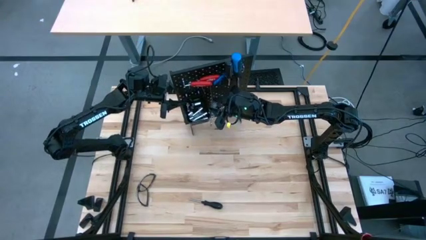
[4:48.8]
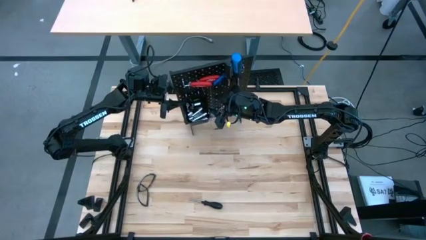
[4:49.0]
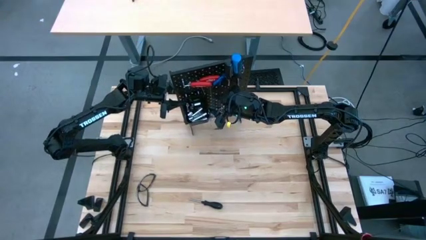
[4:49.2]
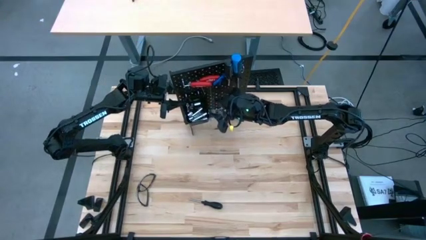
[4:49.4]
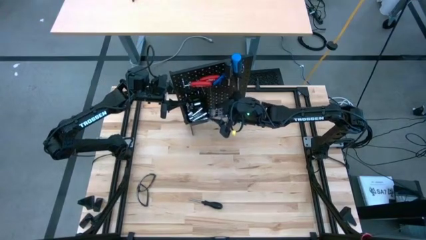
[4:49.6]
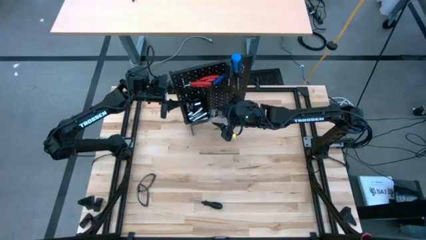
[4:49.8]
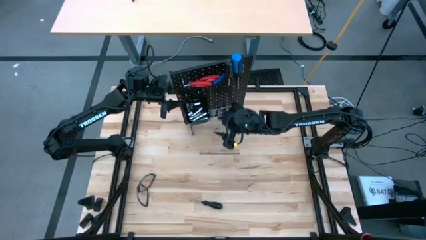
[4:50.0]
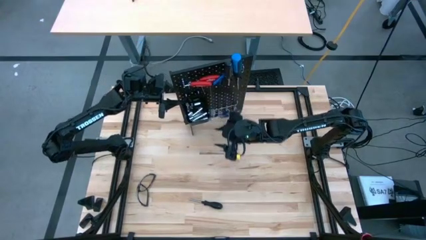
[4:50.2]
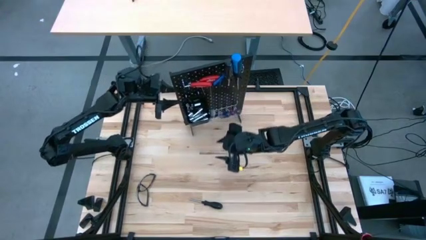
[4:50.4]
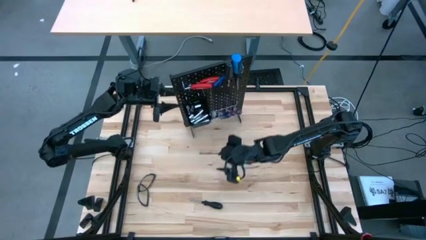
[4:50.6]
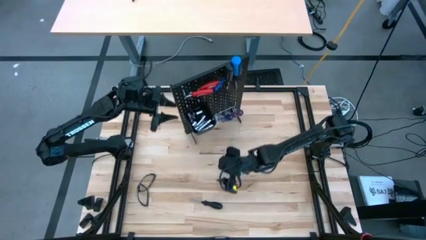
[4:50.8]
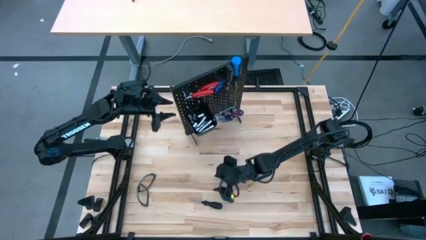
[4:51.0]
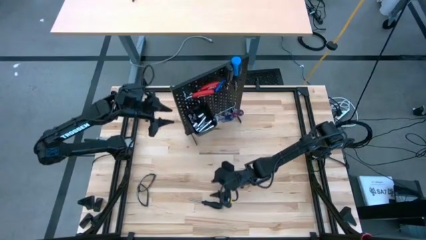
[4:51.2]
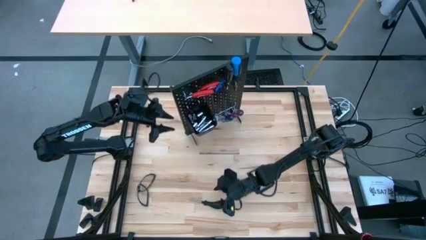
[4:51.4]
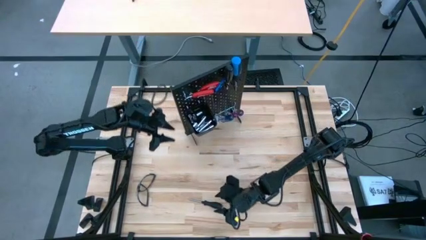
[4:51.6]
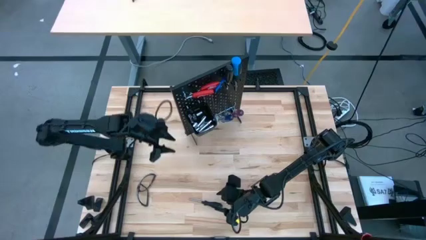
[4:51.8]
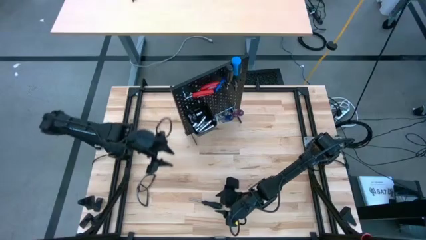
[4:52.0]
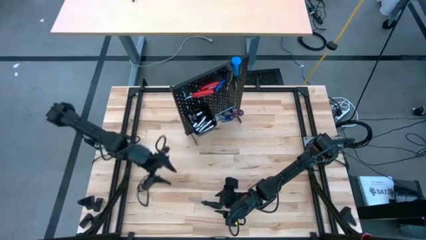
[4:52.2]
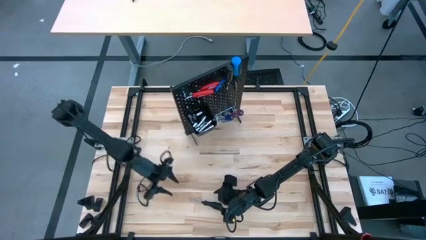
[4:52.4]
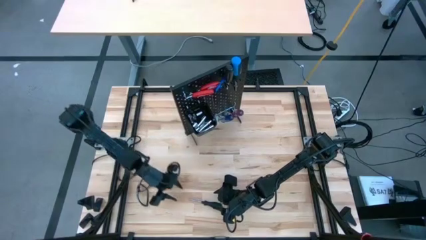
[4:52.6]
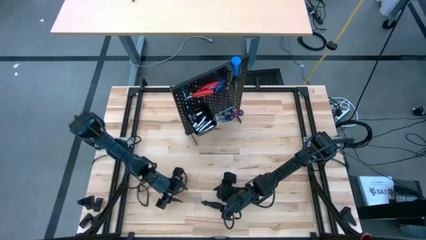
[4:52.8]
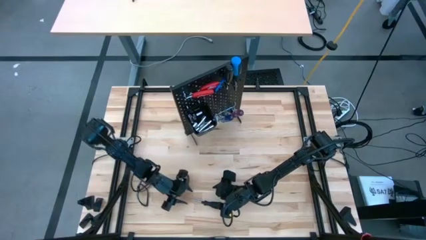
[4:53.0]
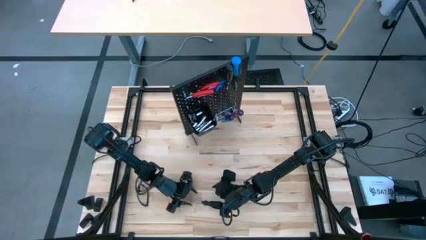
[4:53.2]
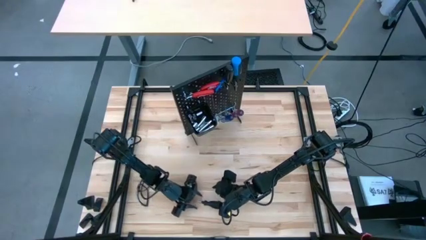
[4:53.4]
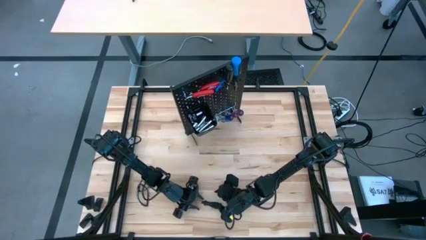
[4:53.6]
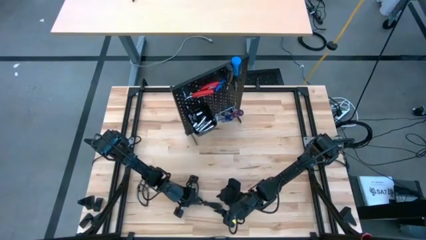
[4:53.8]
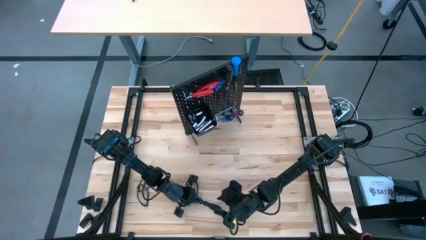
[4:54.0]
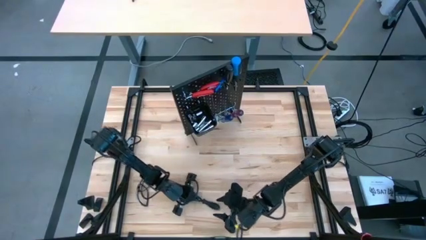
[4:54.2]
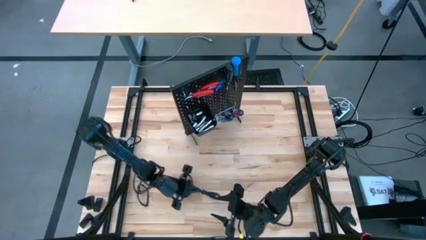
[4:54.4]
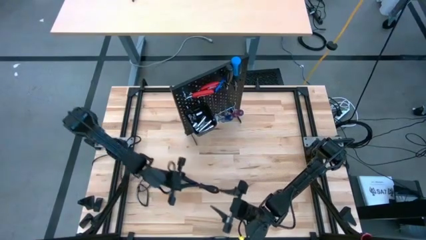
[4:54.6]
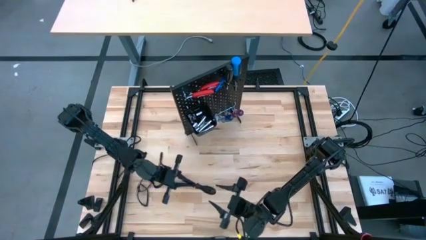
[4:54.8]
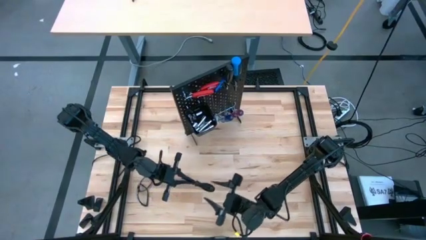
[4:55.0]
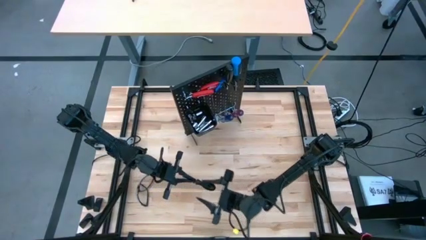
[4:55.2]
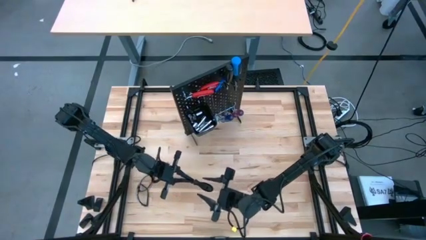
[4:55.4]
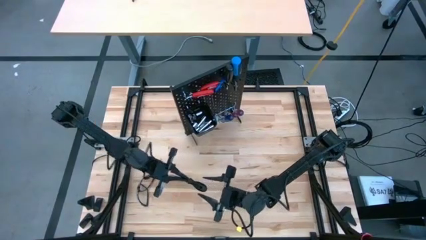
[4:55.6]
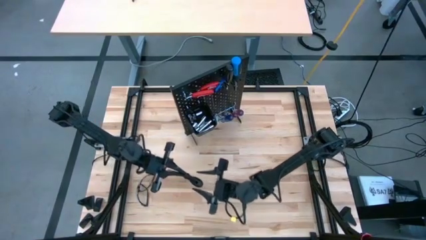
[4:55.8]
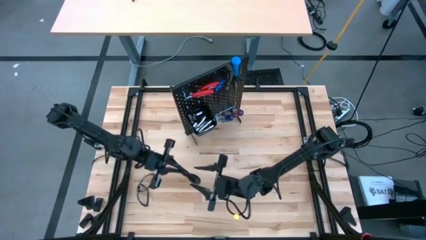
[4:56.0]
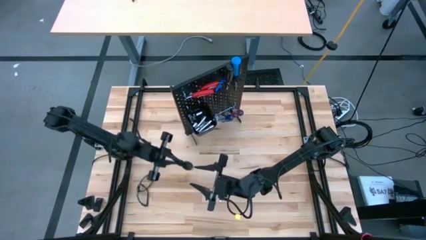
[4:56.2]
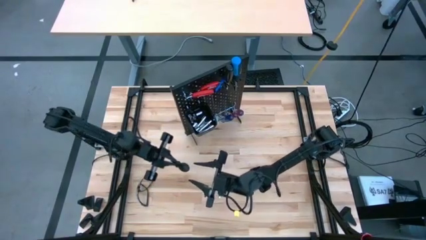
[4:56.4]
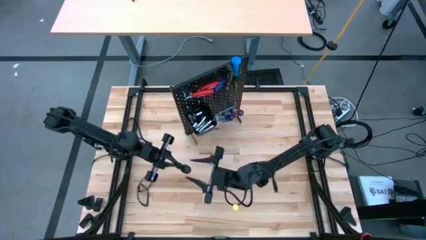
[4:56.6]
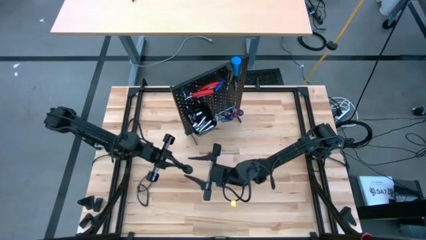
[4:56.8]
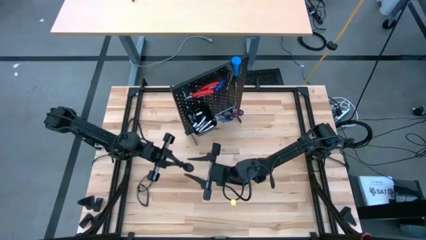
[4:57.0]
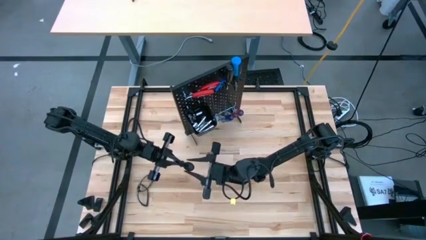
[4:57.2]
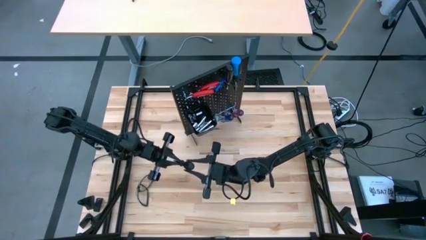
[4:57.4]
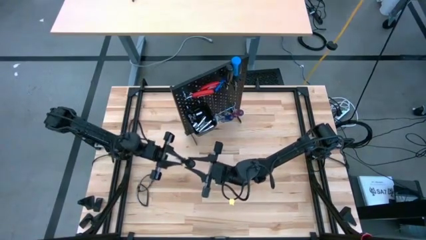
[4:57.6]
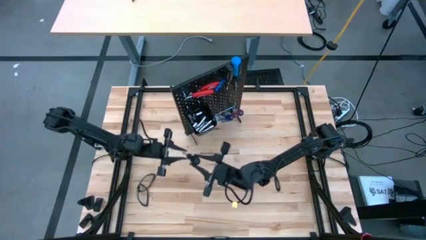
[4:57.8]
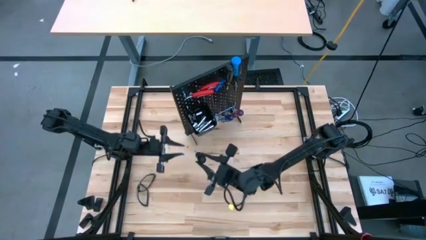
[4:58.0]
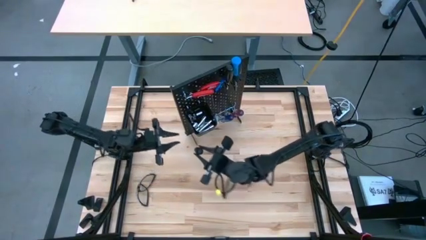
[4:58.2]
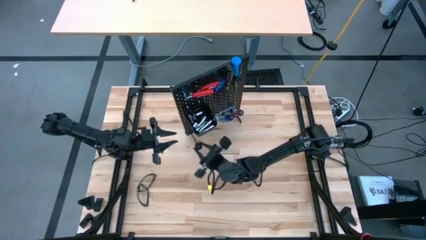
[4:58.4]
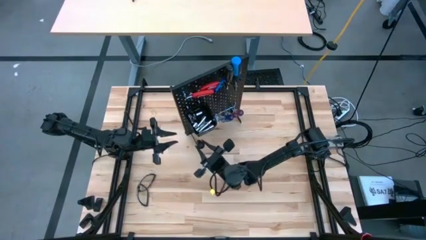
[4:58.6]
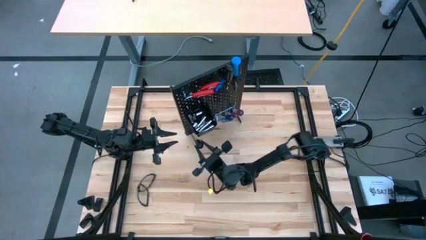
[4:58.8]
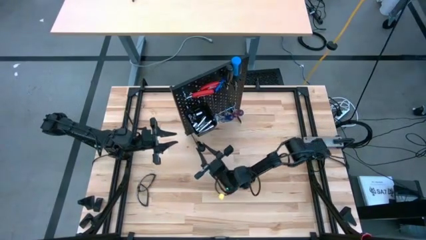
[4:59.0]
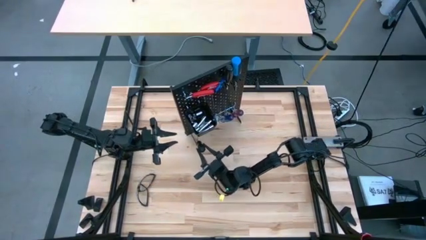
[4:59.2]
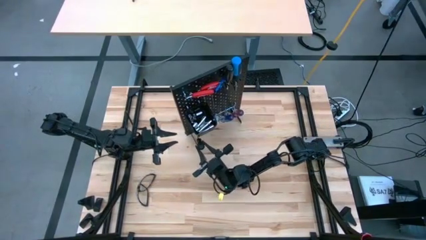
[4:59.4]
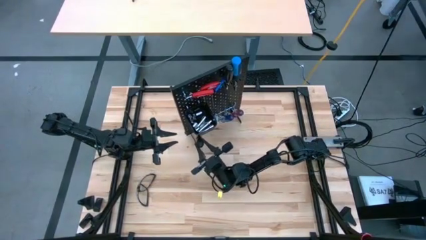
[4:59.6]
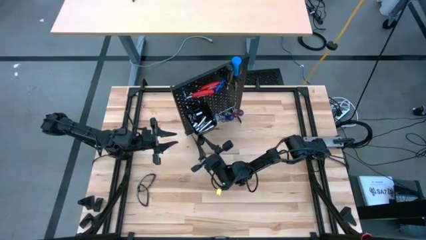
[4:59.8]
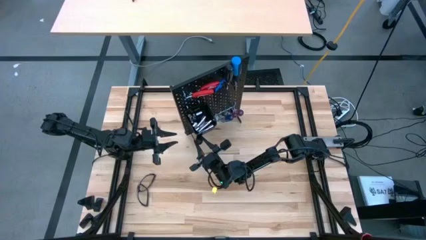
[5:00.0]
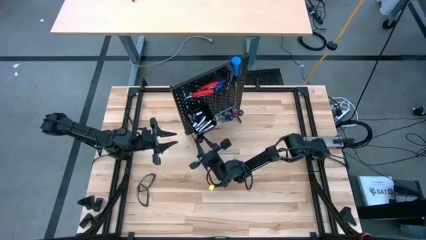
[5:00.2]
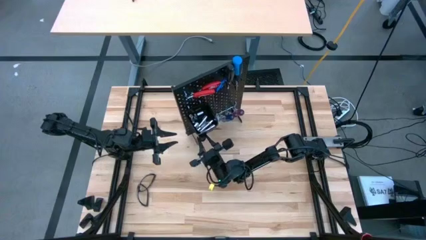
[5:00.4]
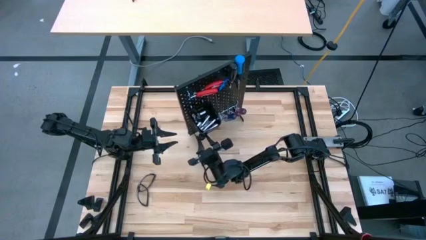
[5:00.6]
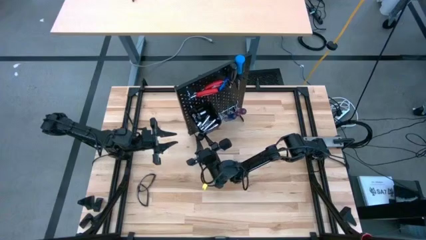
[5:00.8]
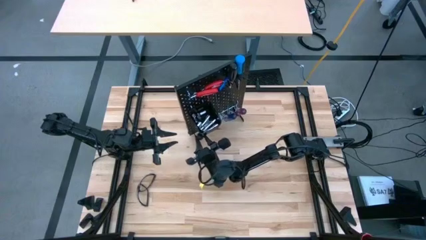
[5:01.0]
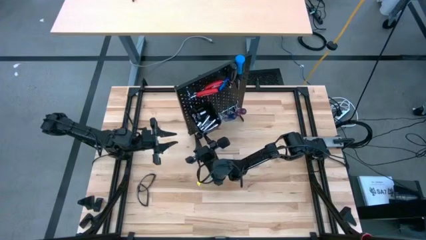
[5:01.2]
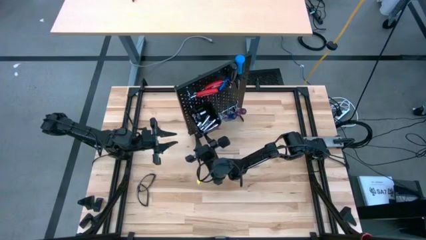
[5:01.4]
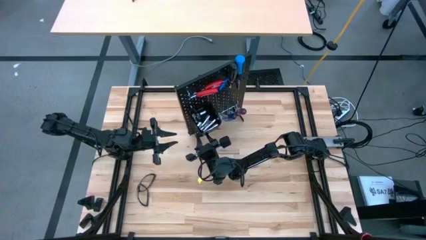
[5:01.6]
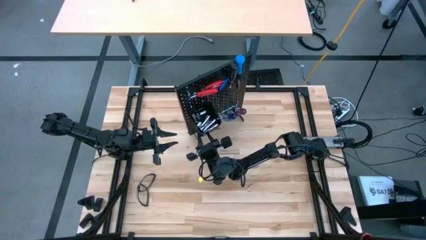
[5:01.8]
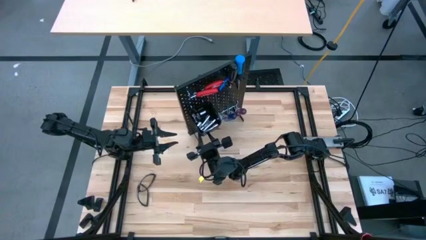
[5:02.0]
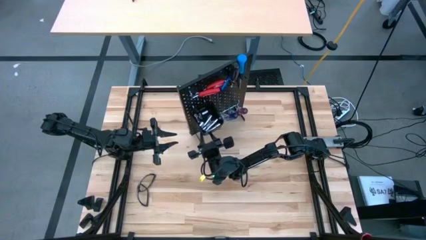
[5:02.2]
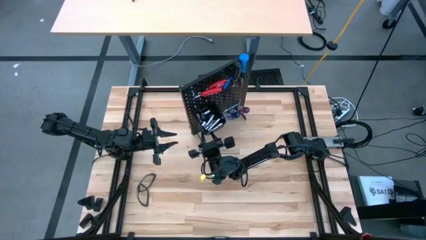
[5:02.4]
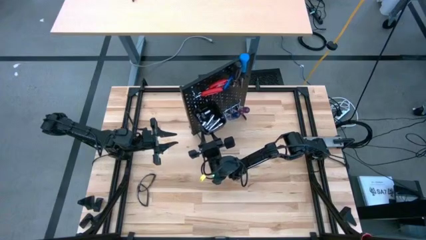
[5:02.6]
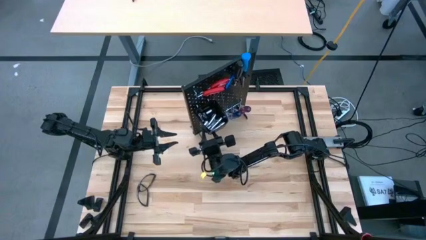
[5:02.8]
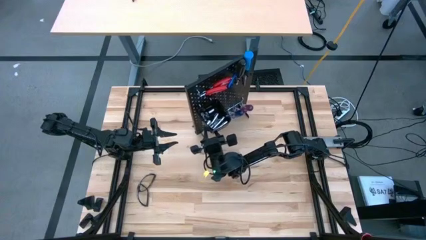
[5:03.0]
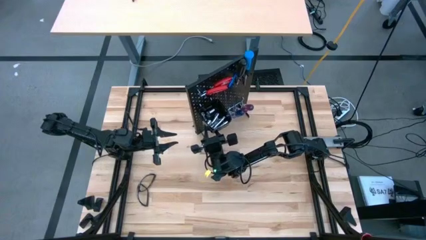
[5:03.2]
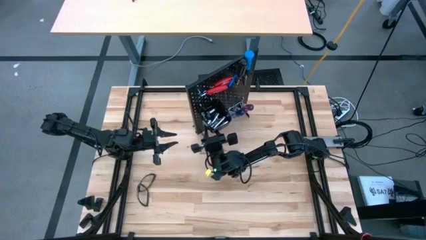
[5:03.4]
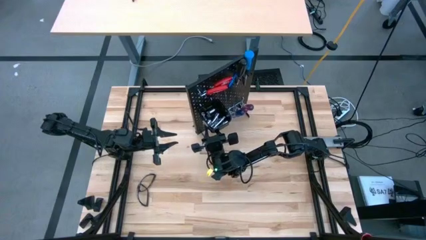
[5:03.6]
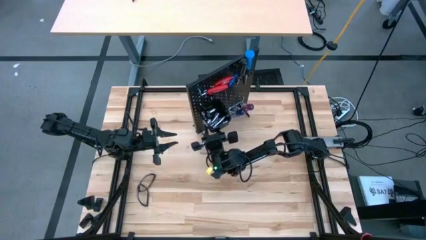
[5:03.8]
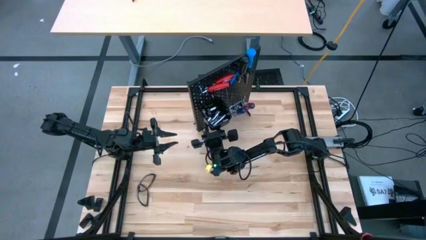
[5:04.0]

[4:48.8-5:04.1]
Task: Hang tools onto peg board
Hang the black screwdriver on the pegboard
